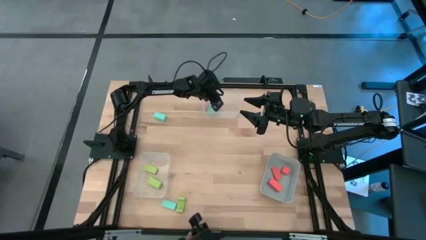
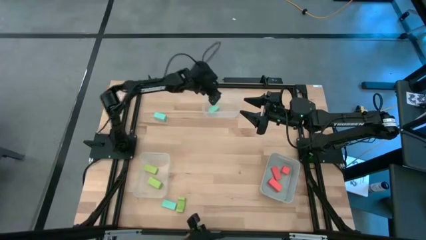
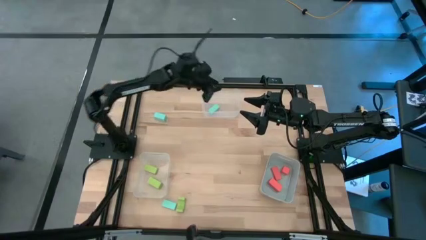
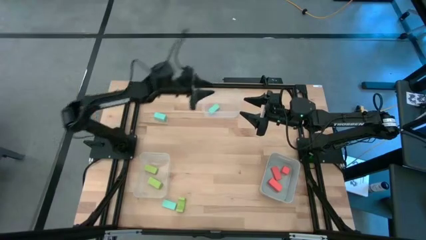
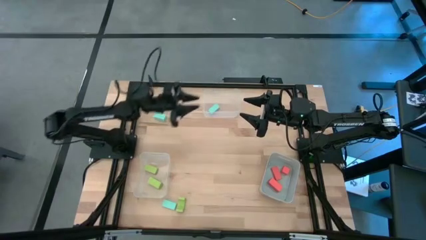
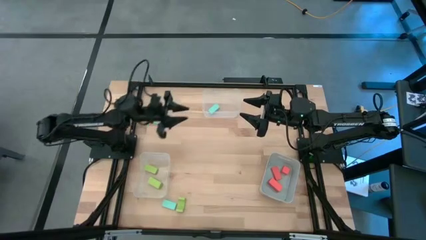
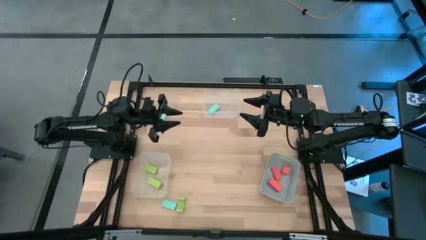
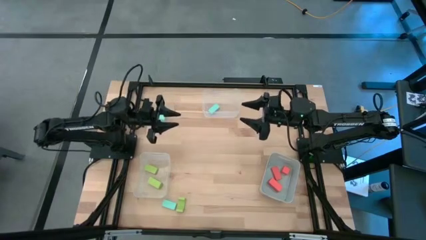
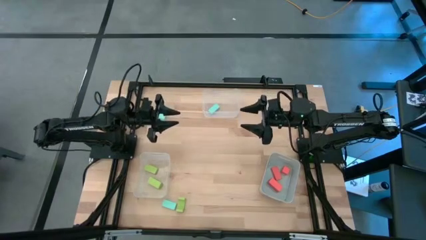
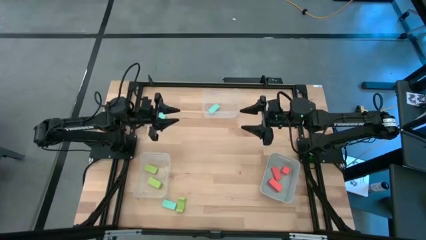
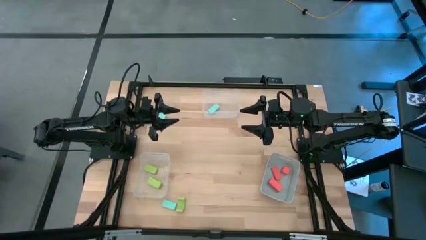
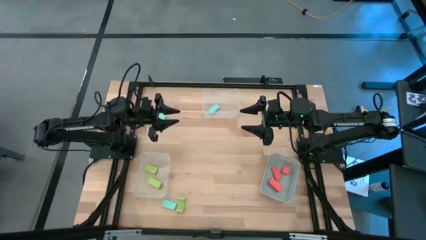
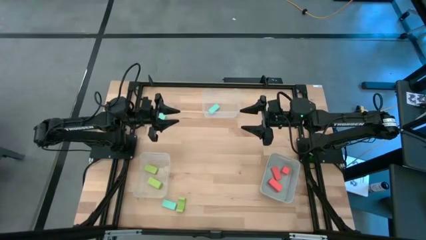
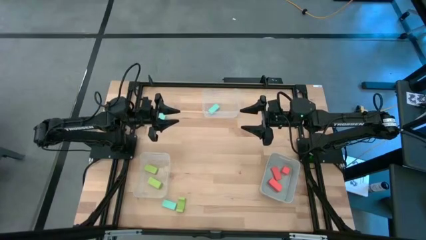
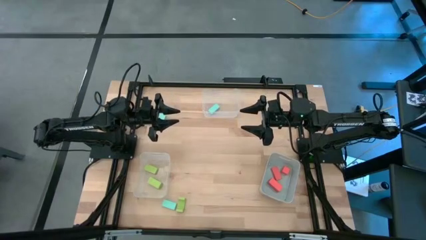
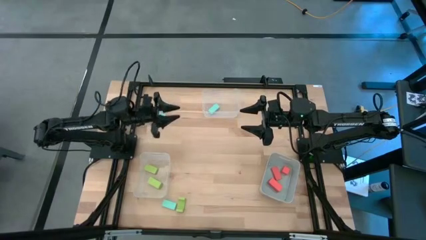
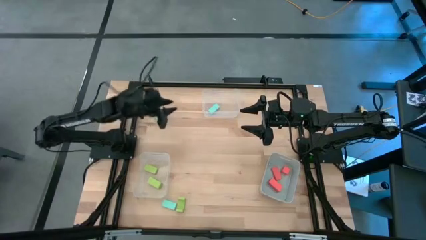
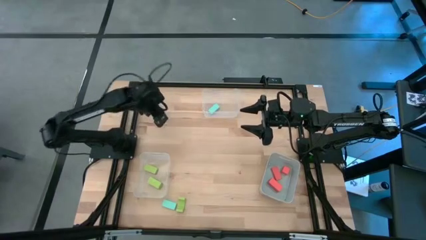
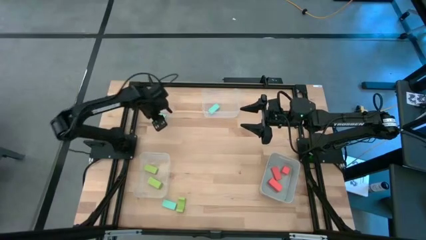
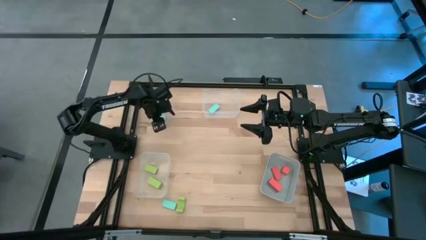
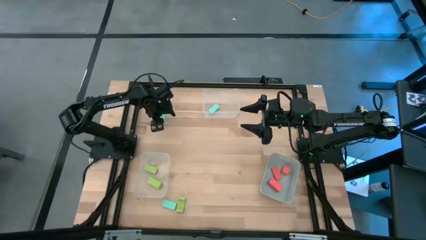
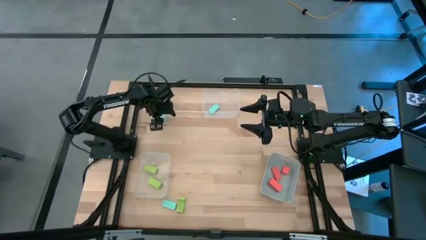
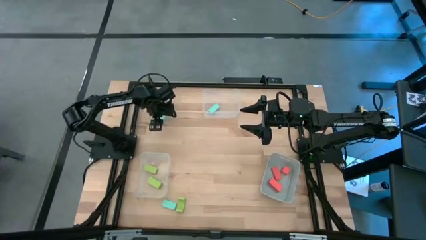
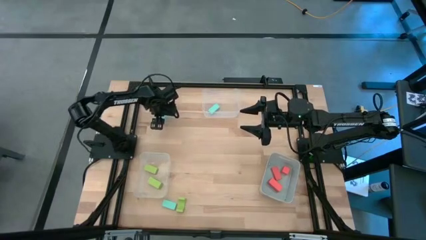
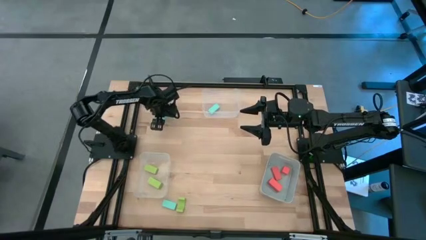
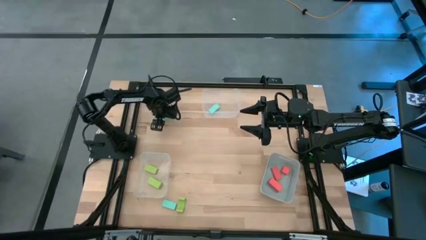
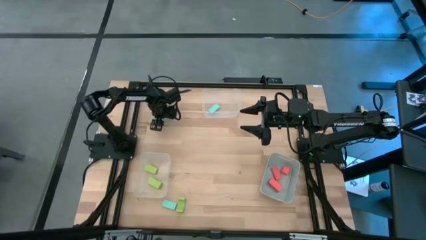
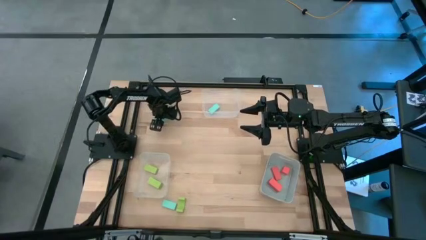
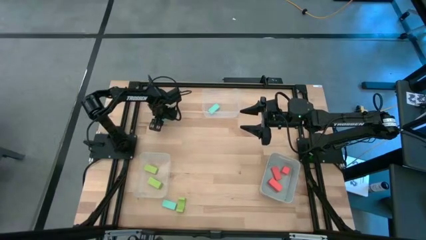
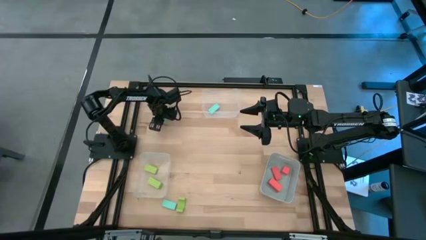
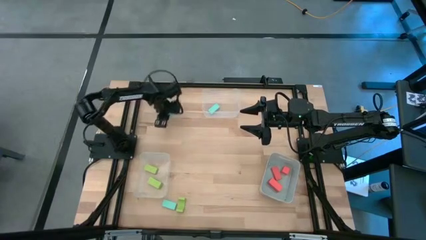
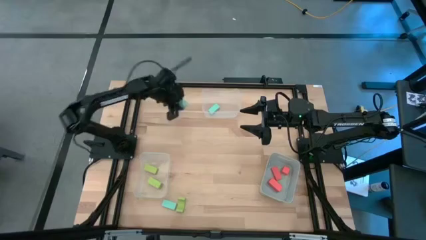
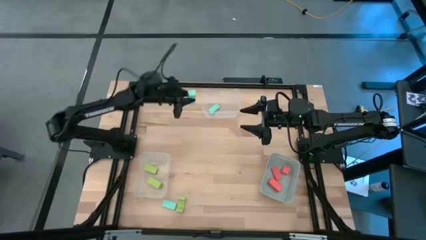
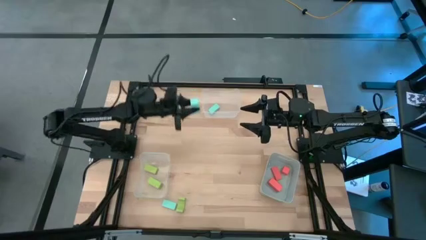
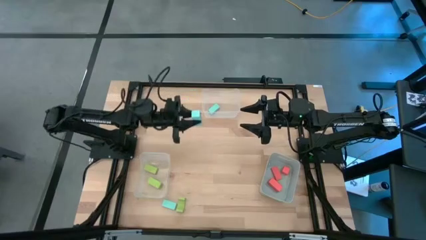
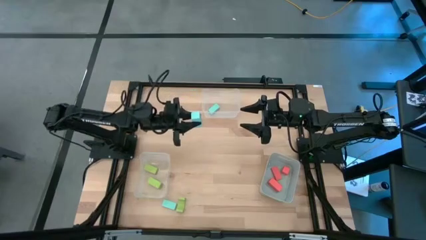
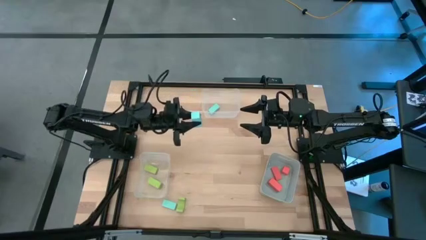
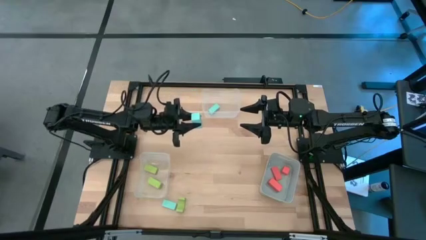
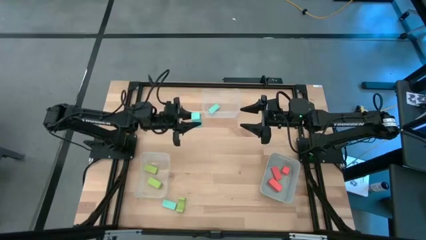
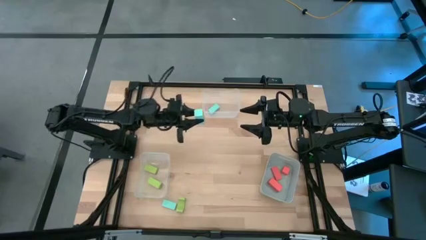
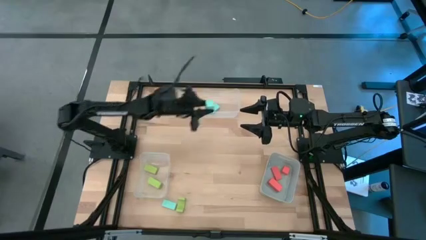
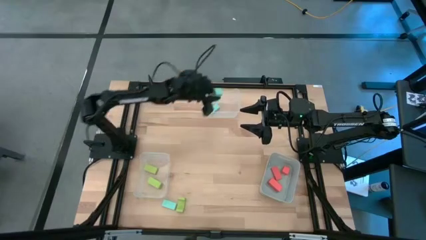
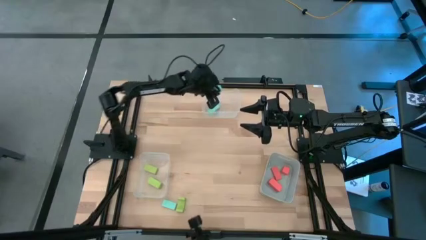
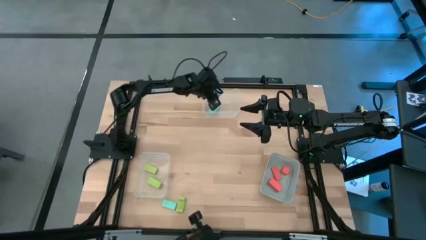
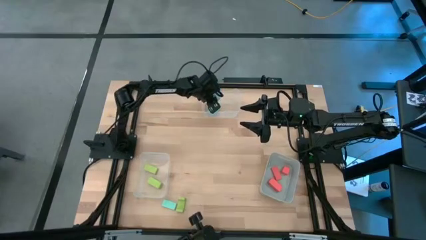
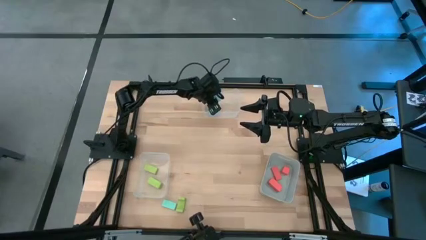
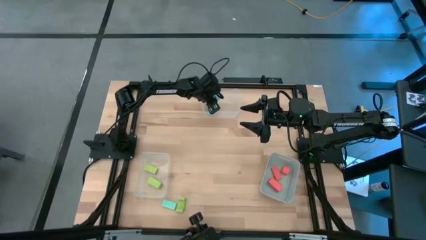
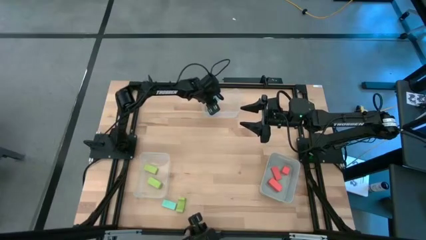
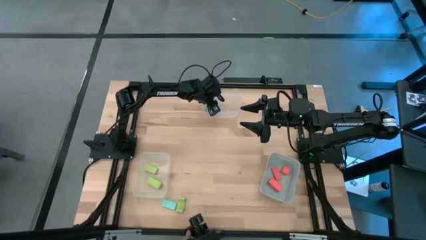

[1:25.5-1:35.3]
Task: Sort & place blocks by color
Put the top blue block into the top transparent bin
